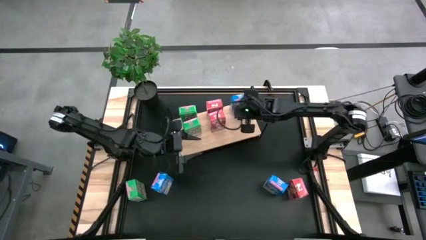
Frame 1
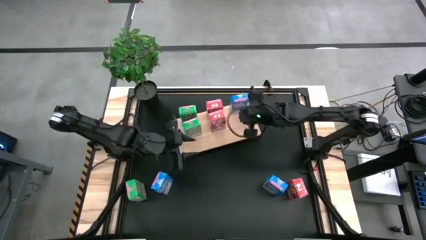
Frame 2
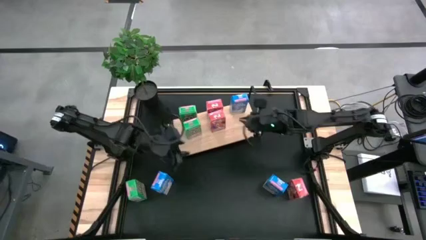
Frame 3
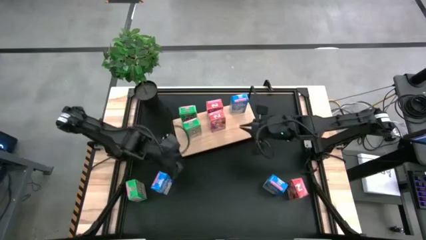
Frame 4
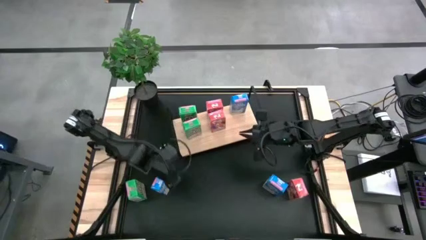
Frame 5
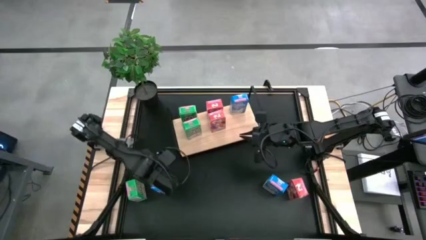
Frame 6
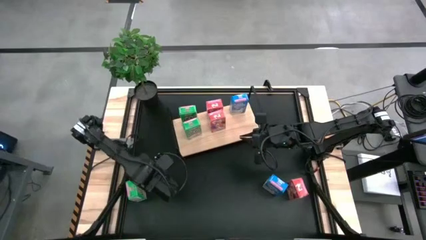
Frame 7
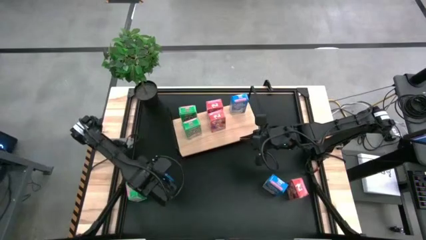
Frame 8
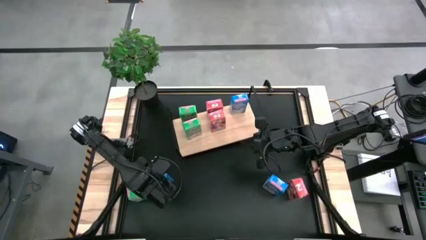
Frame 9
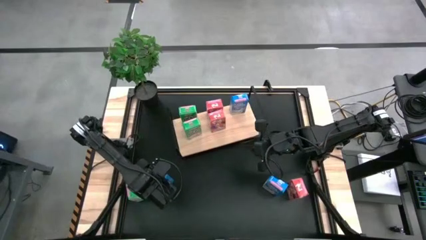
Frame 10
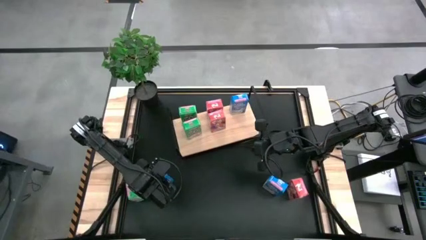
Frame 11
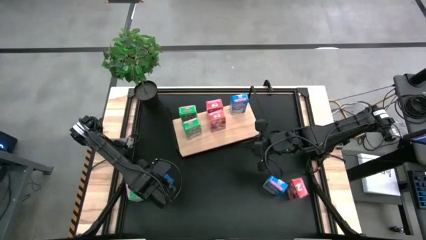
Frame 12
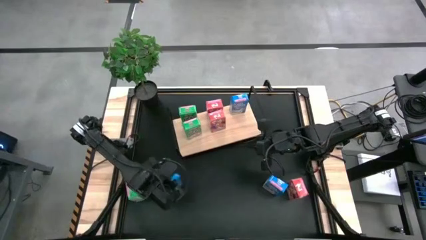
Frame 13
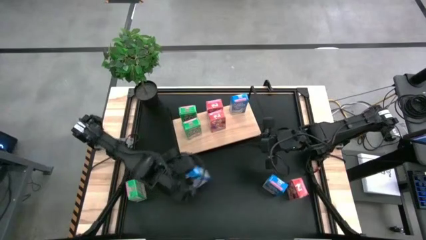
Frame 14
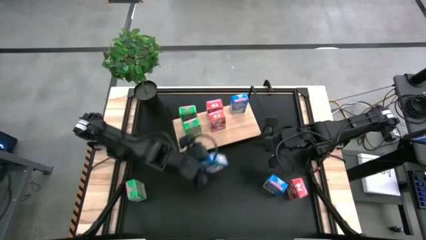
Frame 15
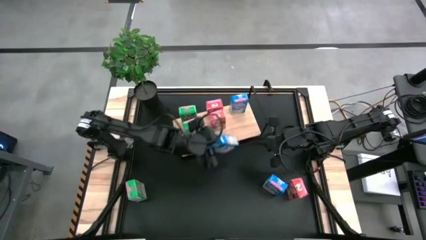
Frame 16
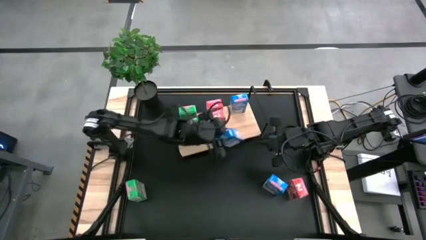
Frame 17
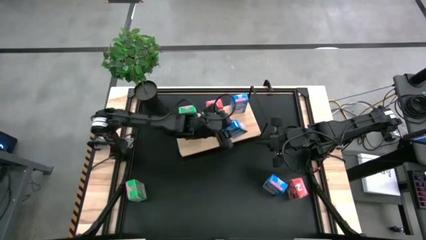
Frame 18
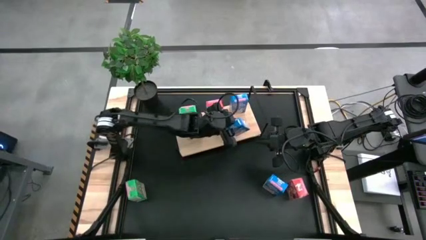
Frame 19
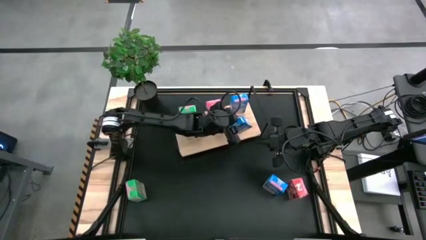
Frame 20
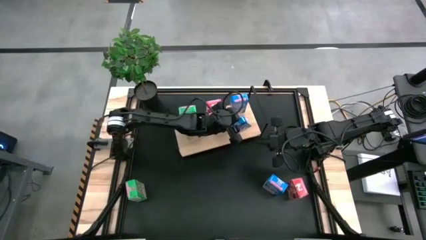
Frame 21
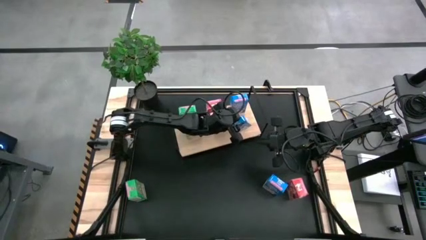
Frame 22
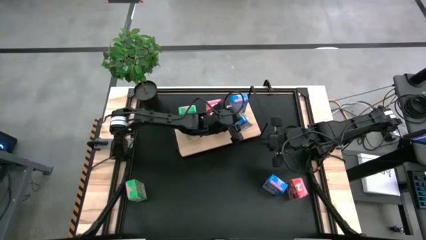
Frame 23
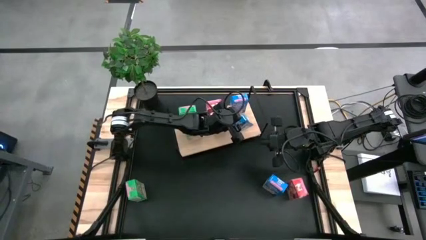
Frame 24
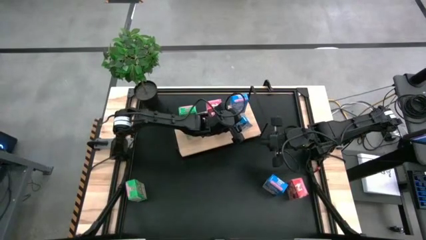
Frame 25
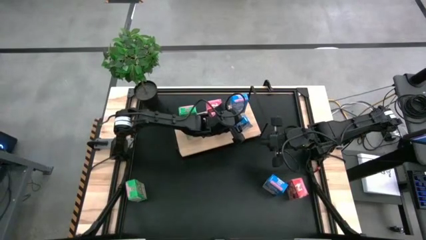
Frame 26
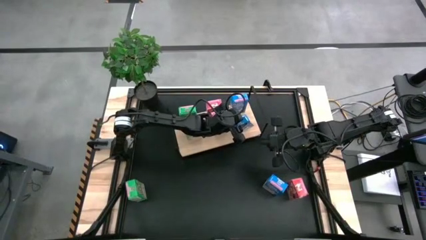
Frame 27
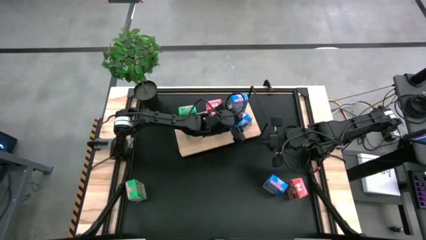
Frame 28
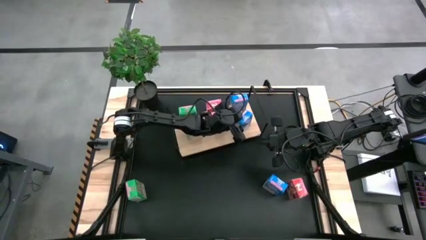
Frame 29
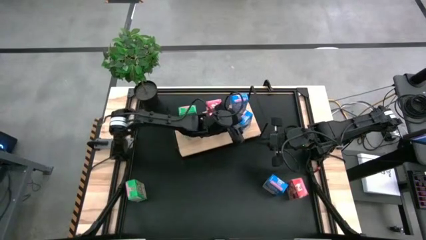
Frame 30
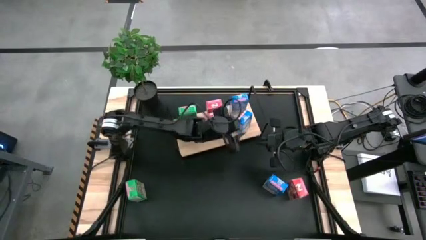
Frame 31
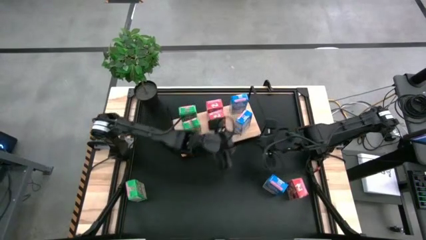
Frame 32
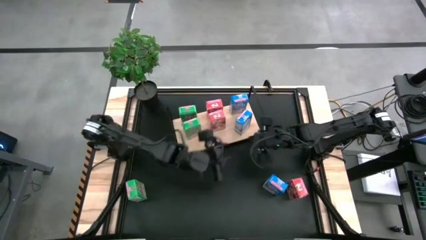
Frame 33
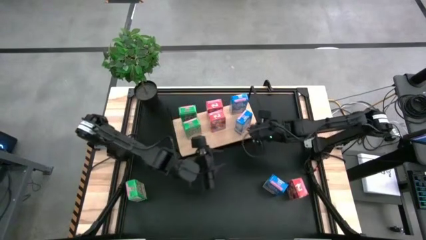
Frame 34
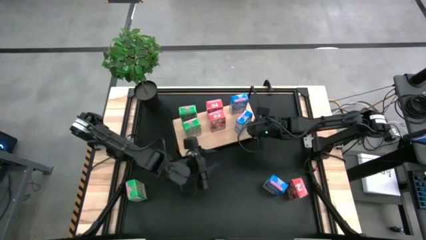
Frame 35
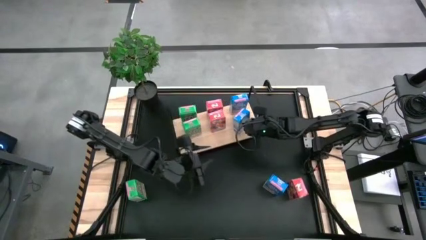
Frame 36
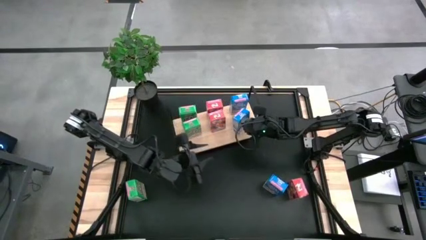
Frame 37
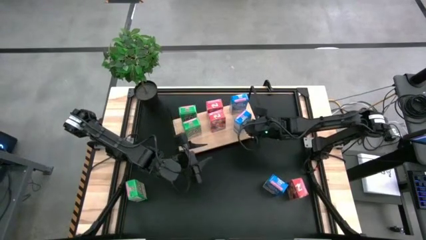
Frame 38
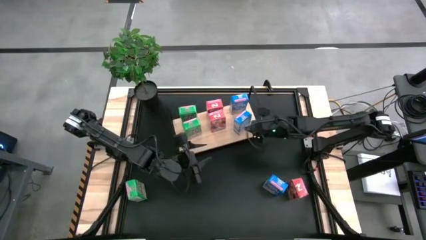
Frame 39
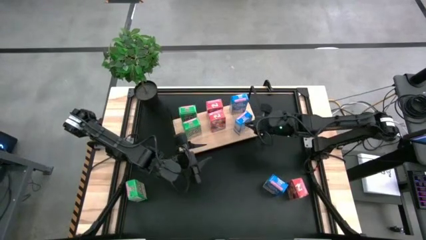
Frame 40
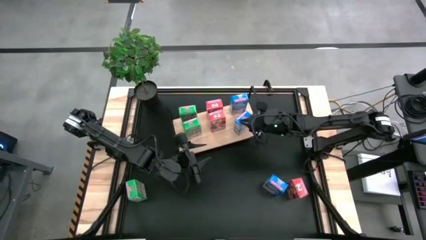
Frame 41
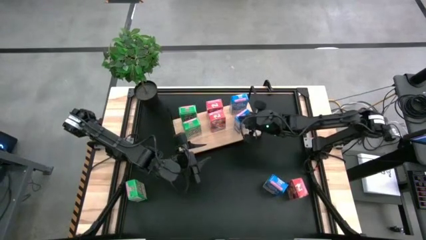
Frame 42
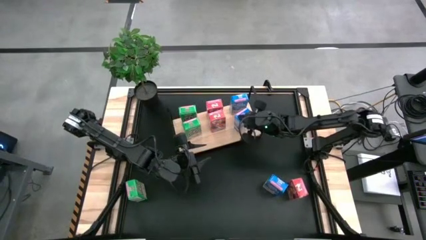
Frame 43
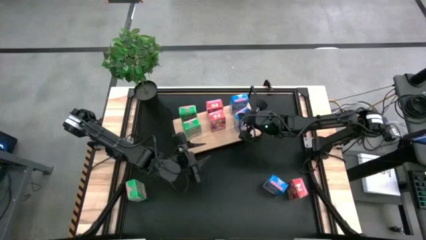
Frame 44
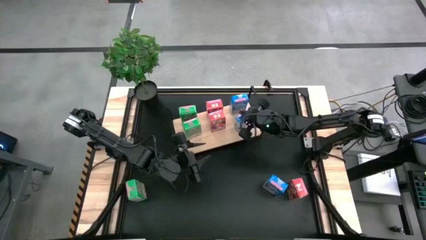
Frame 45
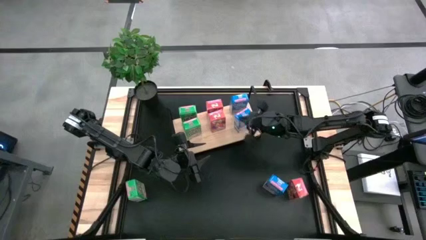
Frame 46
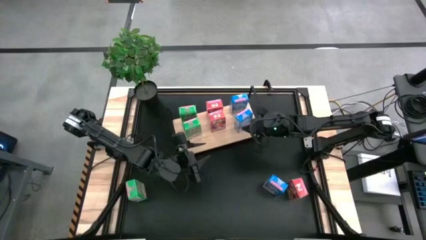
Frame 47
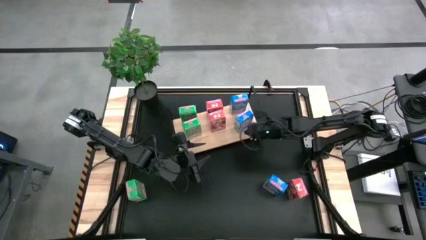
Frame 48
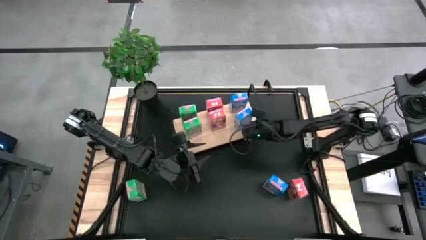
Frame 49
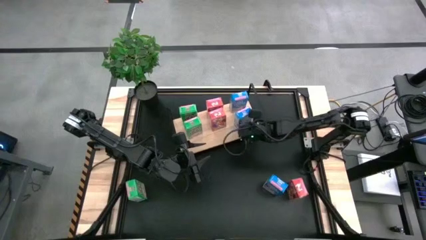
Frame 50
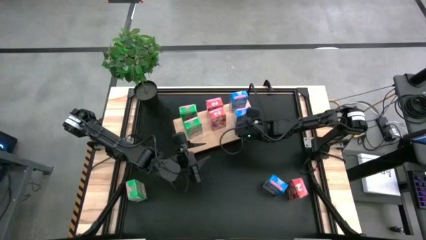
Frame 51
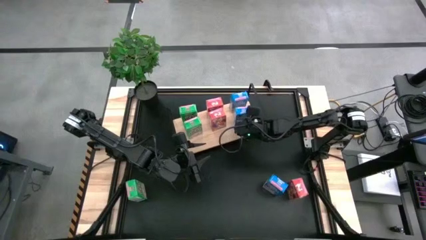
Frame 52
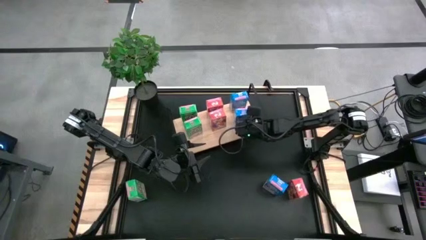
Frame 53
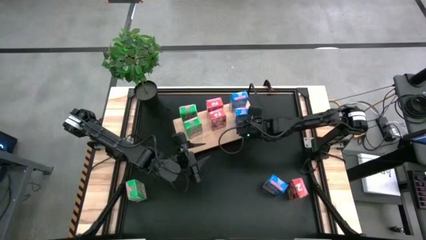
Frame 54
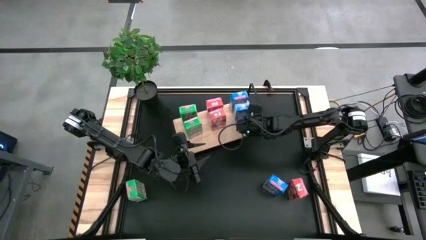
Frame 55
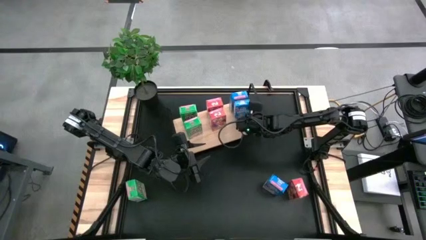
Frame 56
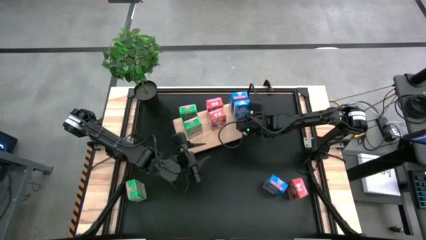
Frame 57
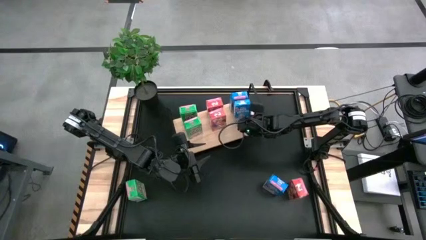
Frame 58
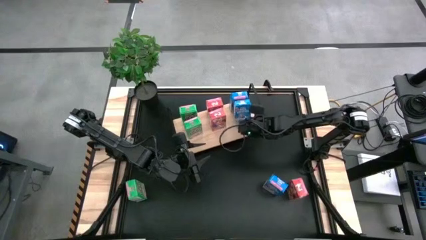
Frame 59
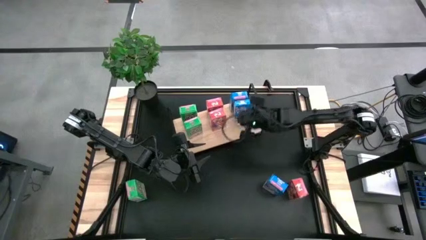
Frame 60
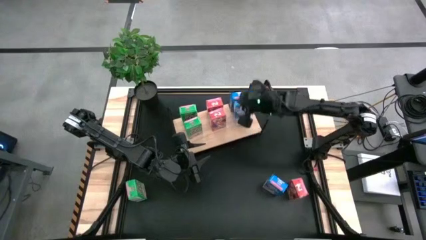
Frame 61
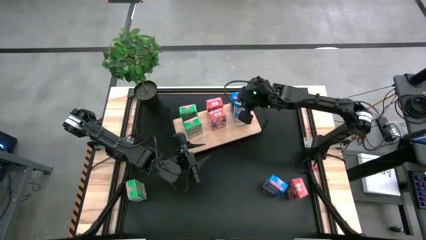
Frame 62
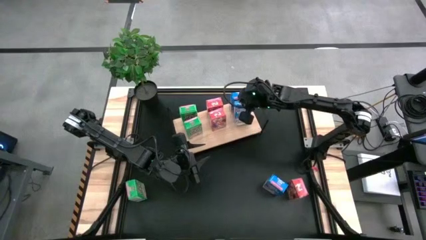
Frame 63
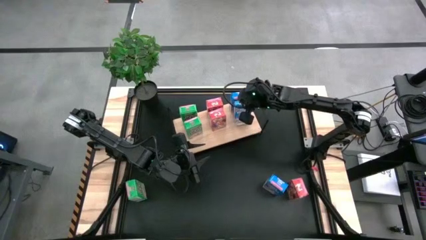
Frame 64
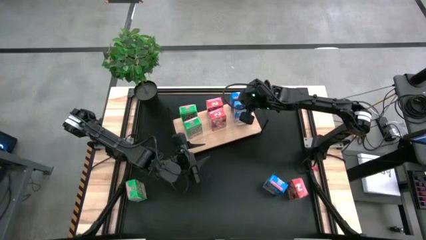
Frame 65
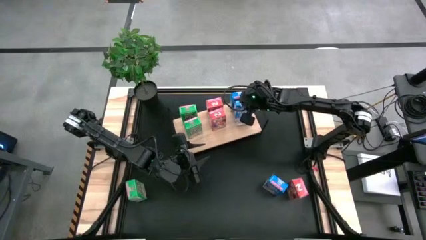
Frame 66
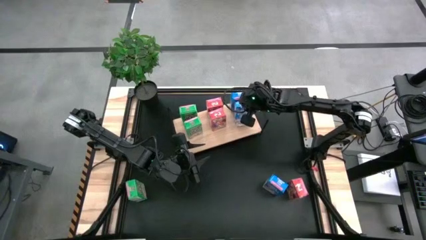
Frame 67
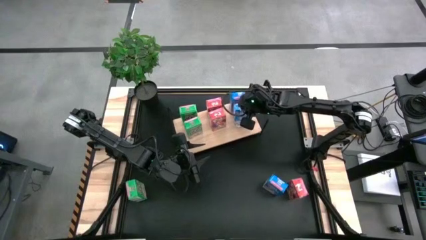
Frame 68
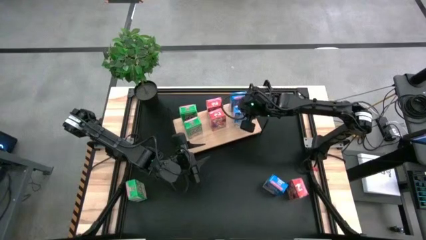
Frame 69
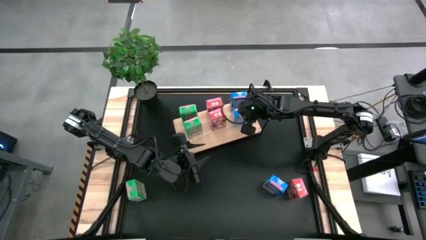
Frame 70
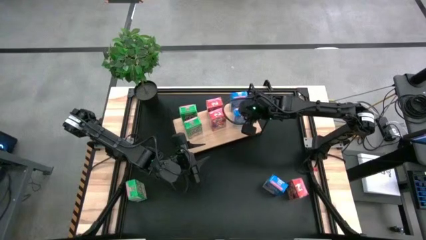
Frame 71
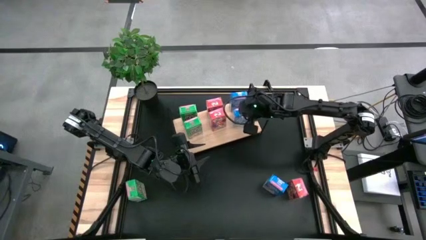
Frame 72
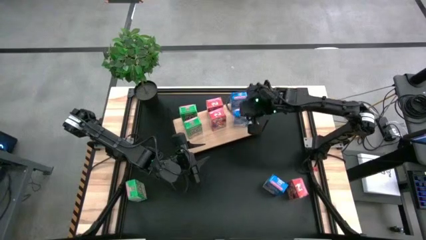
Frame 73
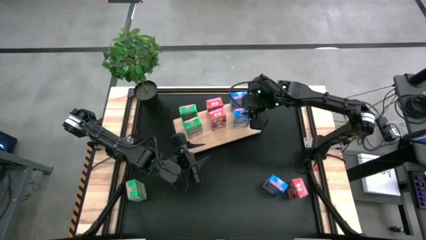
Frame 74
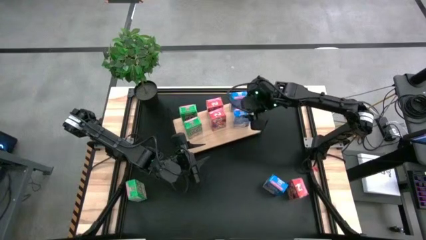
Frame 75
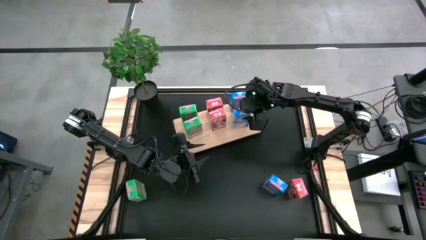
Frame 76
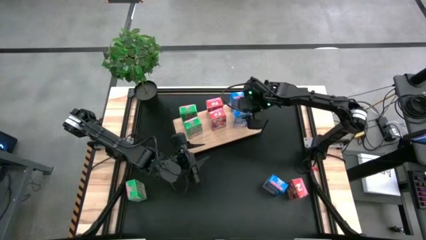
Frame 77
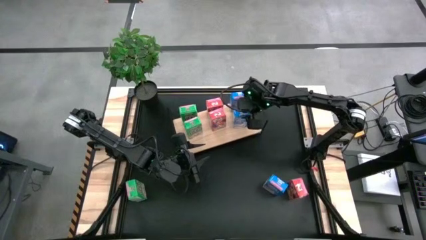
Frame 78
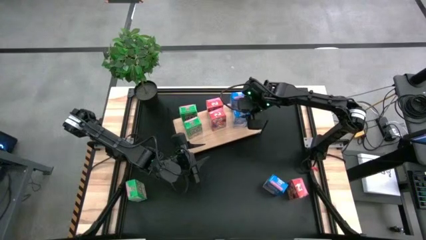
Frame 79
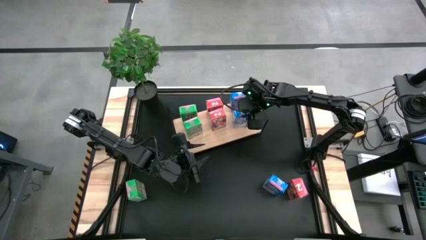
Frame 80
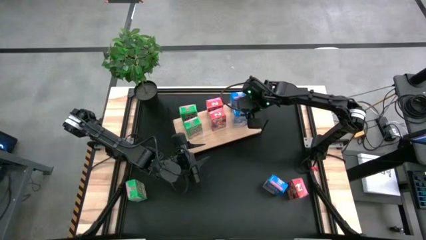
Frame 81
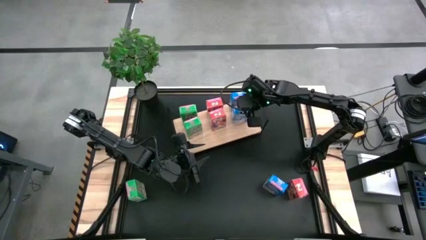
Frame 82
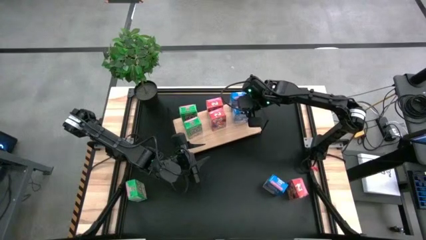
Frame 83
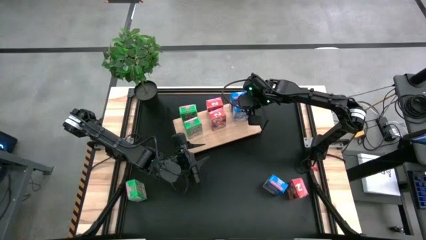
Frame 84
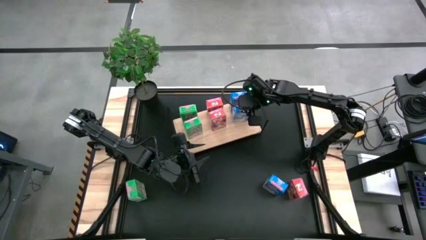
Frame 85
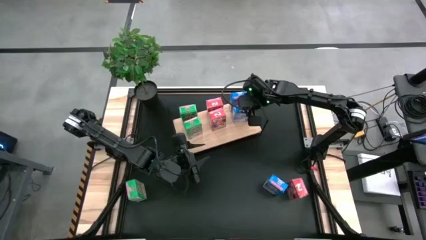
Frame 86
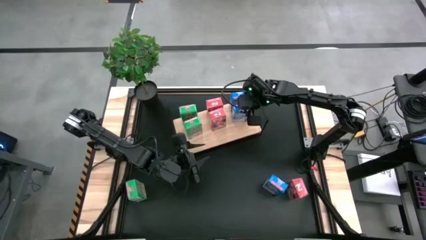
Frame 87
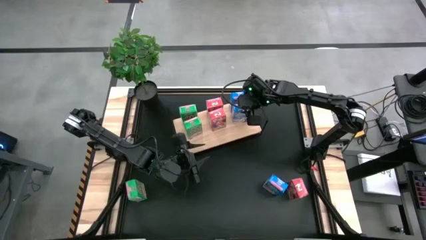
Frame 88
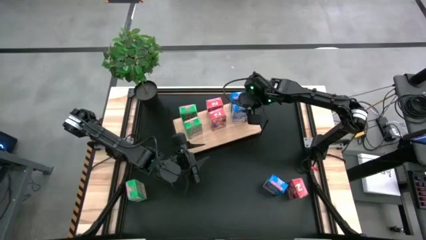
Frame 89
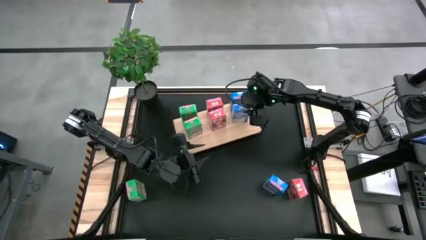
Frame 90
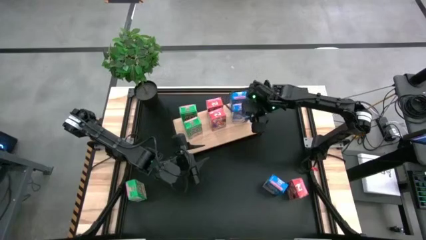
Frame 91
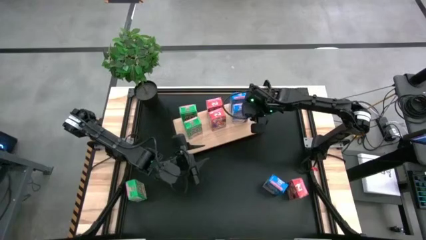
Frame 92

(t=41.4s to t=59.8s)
Task: Stack cereal on shelf
Align the left blue cereal box with the other blue cereal box on the shelf
